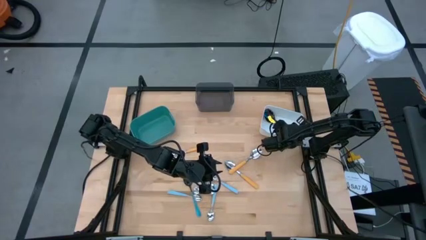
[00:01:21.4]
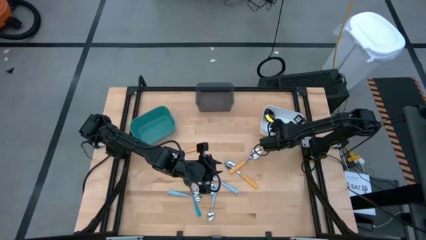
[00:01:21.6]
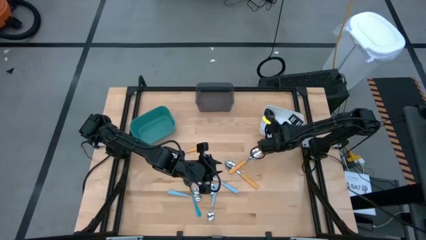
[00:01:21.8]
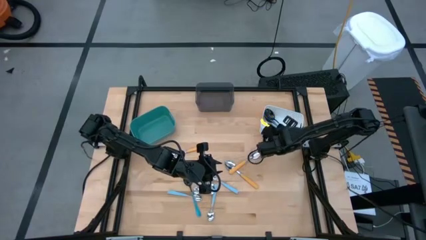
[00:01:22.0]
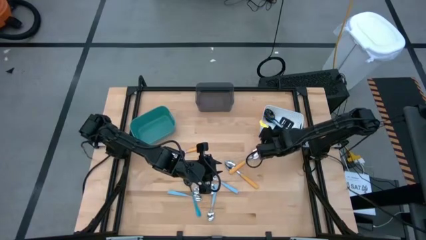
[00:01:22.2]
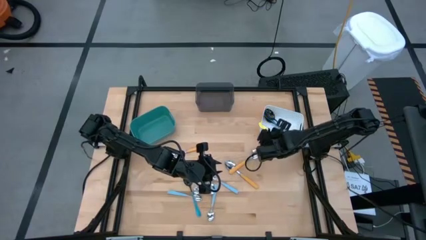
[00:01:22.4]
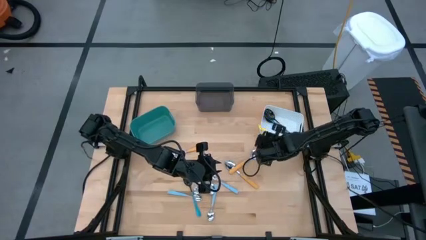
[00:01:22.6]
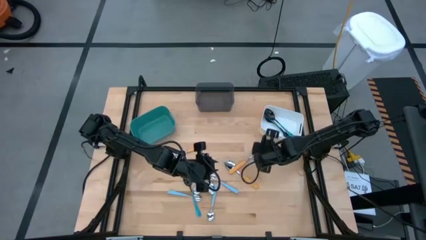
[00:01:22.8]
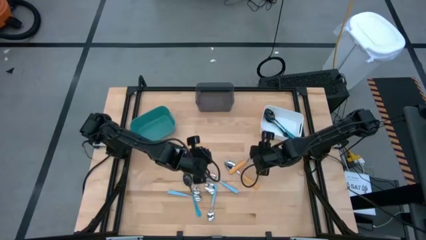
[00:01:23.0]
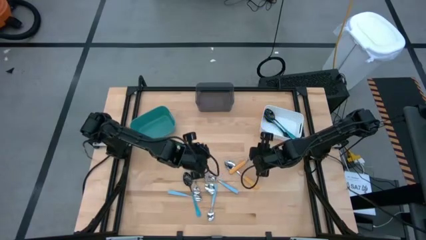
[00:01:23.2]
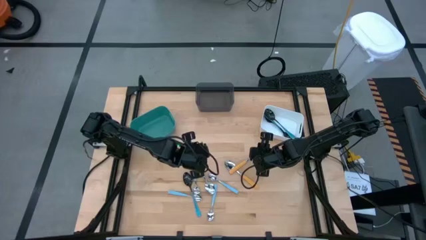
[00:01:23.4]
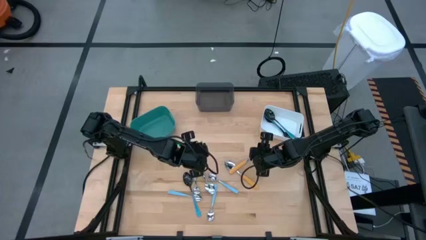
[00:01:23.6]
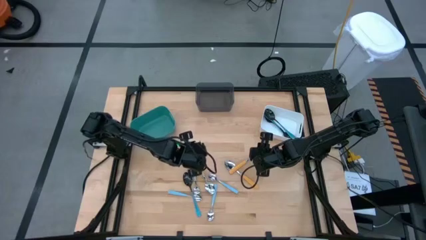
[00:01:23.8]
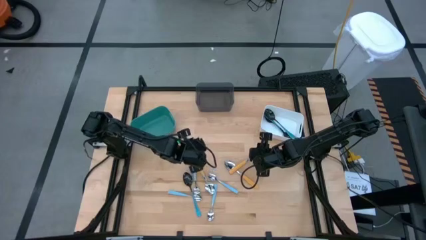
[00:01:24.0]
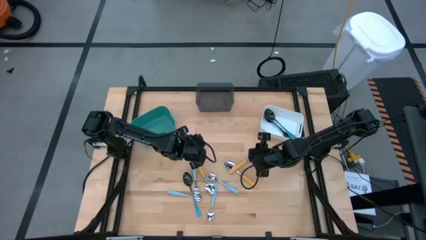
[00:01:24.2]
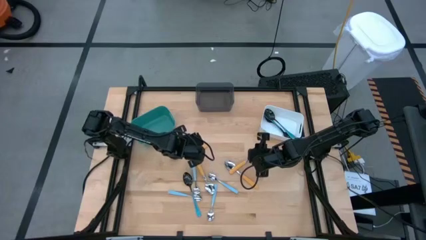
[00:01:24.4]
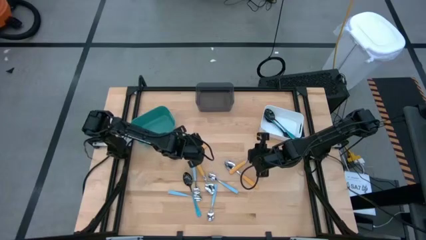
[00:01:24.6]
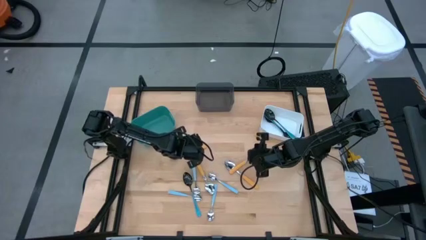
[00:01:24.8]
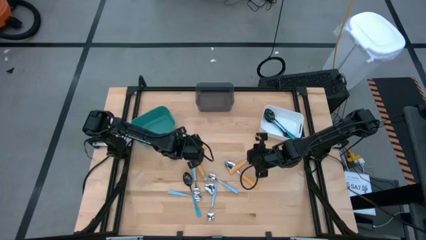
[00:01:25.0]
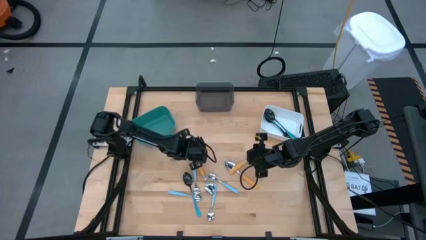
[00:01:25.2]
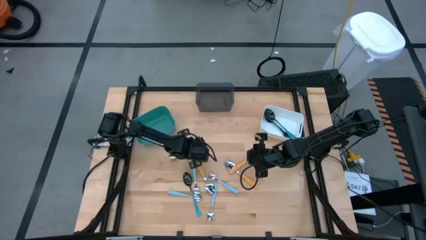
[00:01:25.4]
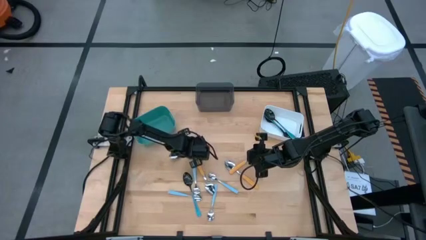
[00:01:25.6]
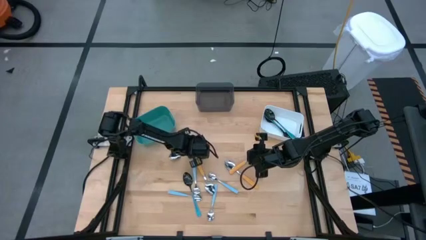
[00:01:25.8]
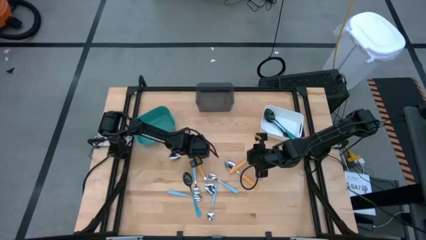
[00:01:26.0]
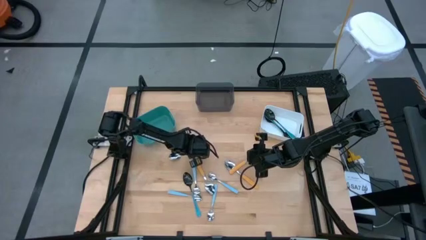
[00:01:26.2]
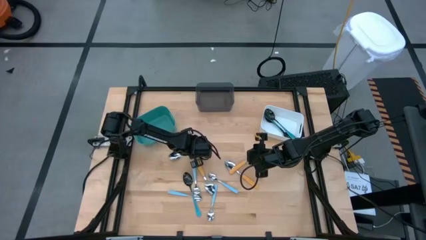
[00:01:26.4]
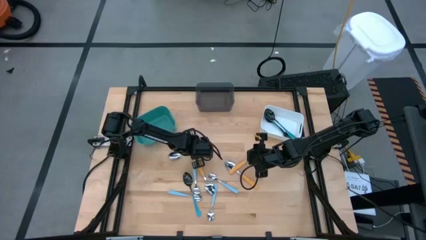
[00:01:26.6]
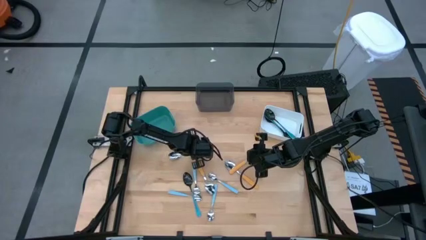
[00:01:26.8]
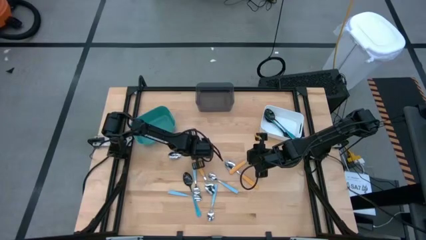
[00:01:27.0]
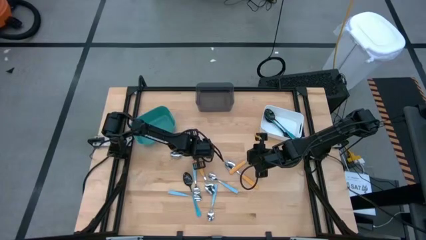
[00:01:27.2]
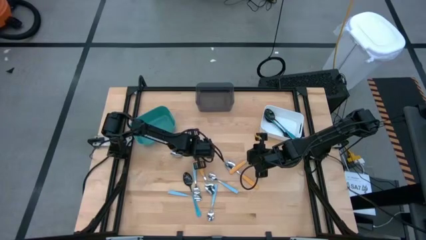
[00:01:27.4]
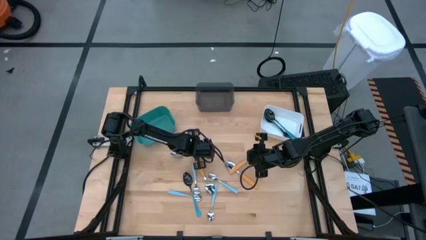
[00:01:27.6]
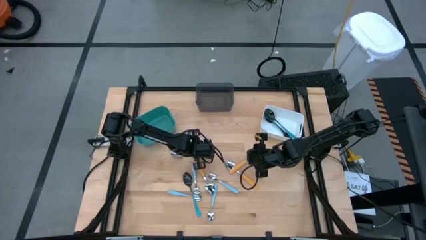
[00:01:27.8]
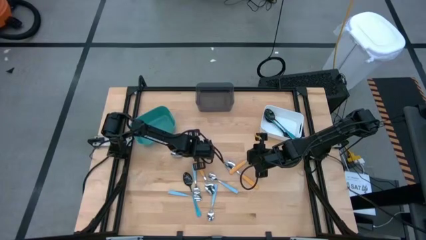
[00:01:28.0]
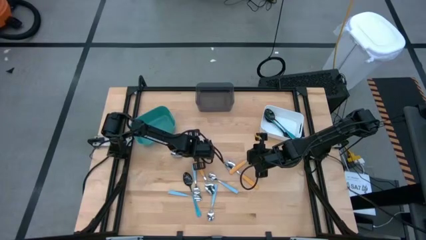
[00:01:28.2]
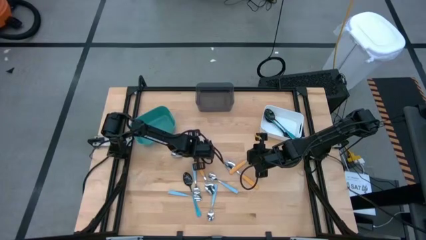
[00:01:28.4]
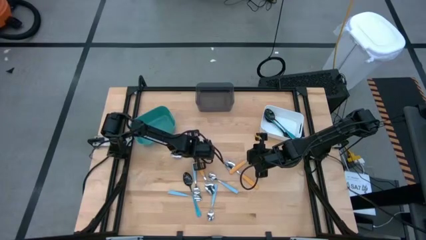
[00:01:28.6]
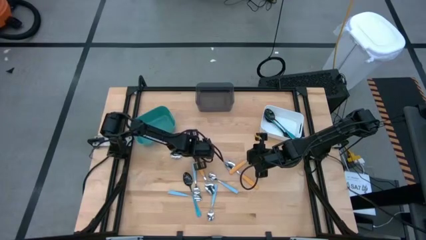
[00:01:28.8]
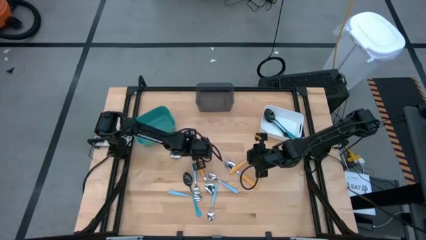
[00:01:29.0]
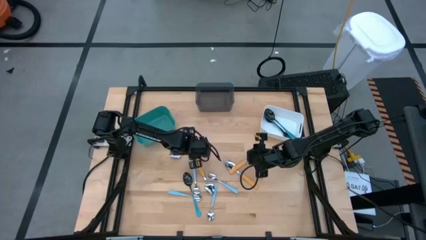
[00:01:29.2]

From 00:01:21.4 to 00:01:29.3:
Task: Sort silverware by color (type)
Put the yellow spoon into the green bin

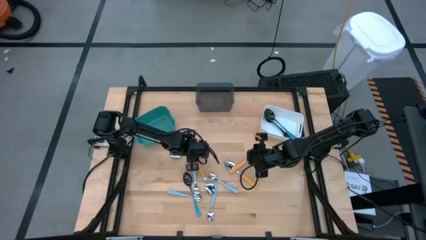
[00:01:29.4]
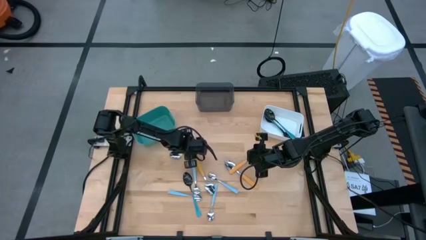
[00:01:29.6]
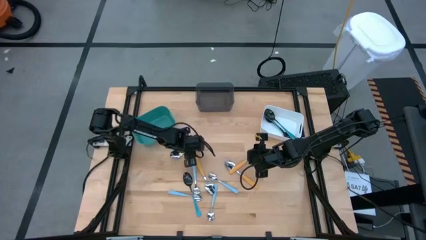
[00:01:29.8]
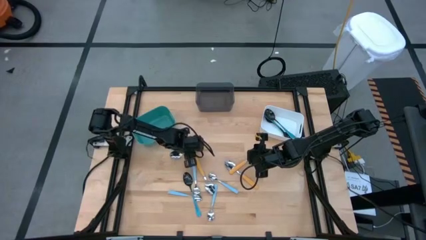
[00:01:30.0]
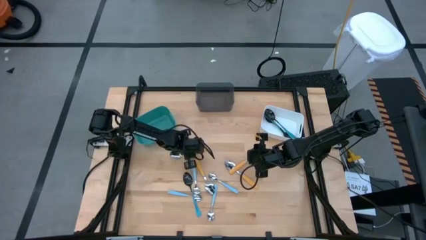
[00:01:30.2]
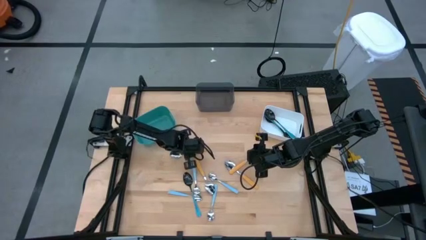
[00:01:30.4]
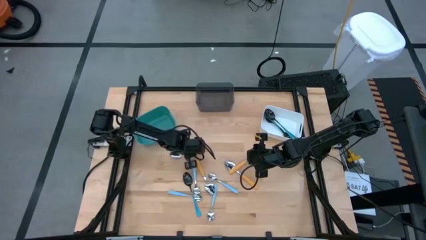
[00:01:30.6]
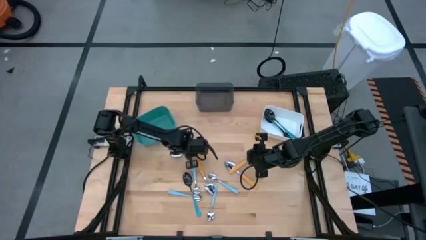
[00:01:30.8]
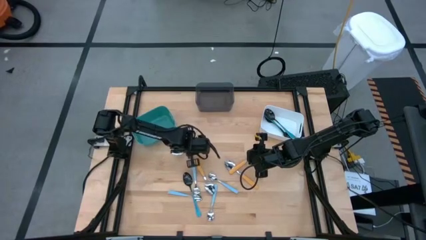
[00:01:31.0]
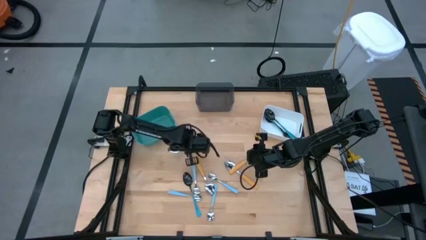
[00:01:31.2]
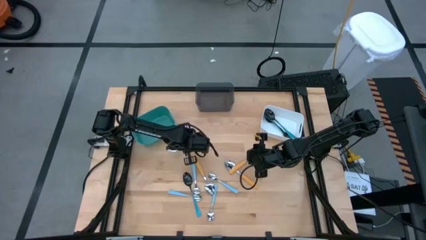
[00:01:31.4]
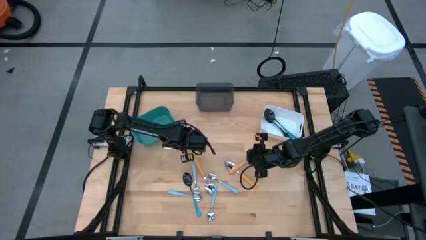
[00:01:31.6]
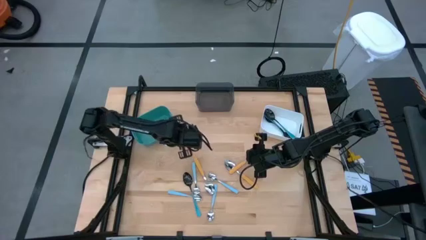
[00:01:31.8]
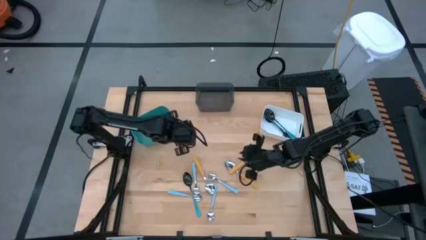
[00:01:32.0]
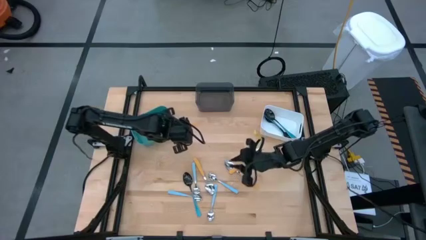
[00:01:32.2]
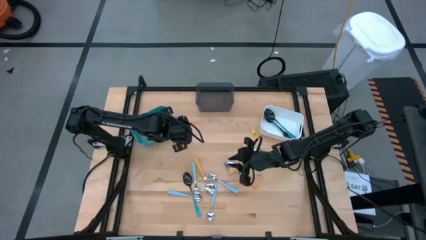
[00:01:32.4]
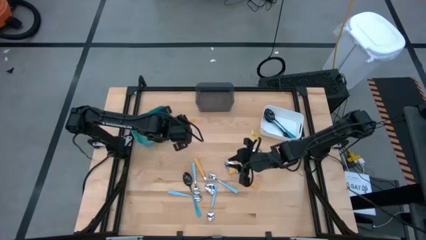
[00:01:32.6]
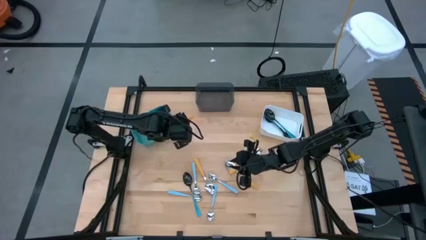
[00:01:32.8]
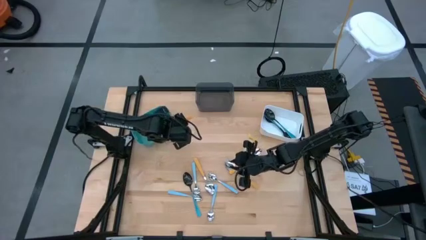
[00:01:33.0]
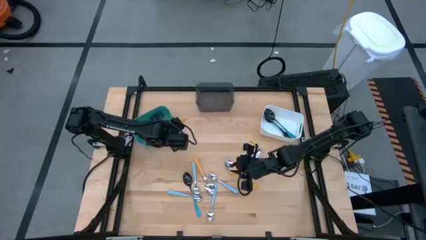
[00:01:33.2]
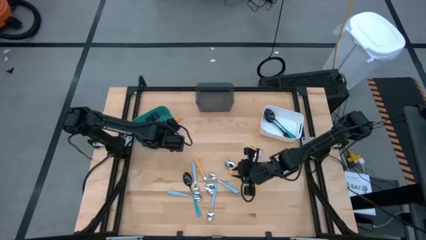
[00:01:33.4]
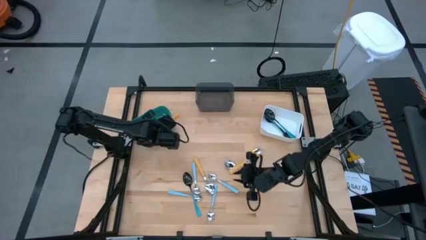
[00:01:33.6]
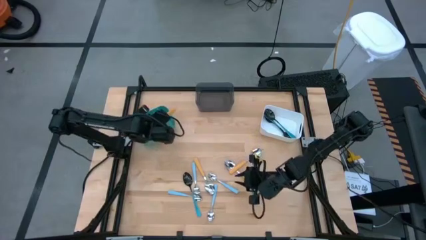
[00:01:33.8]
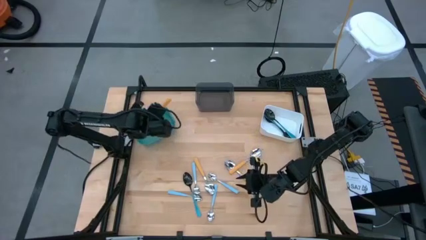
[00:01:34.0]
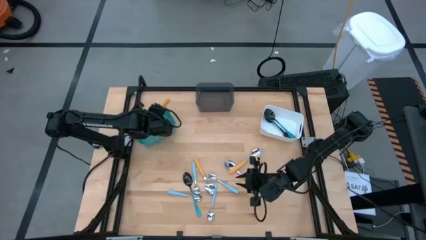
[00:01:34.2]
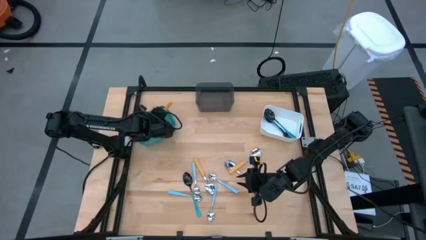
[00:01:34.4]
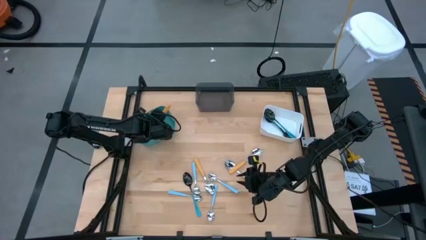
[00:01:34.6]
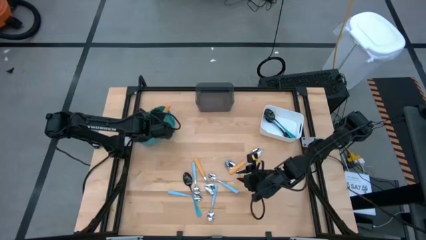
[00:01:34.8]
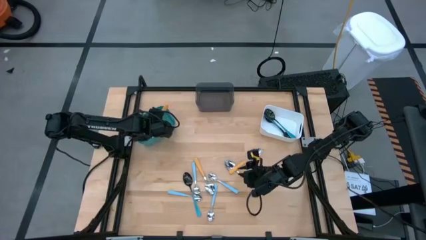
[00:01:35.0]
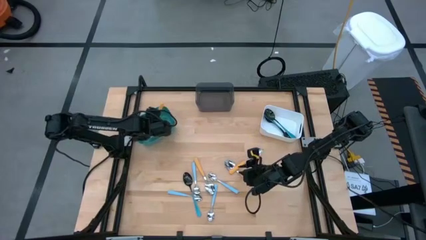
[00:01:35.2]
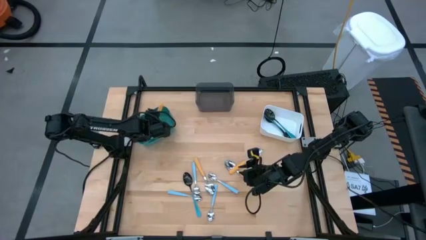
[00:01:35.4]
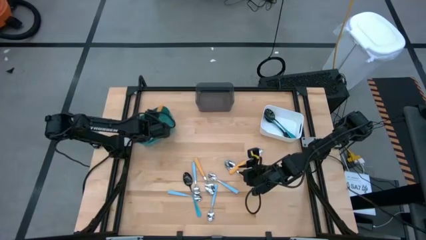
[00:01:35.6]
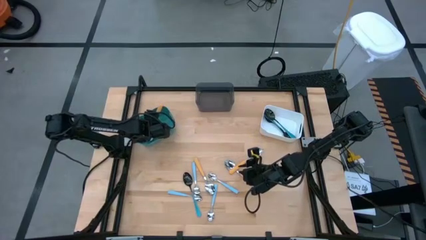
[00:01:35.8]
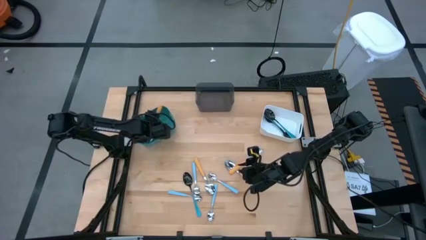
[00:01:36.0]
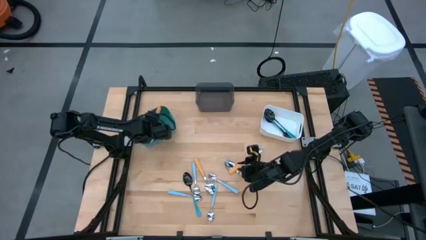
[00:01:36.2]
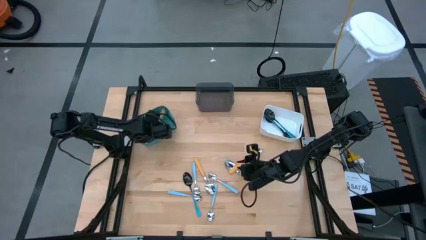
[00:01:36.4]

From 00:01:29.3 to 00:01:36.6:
Put the yellow spoon into the green bin
